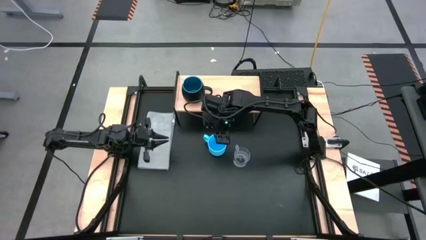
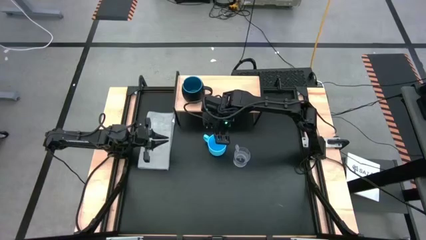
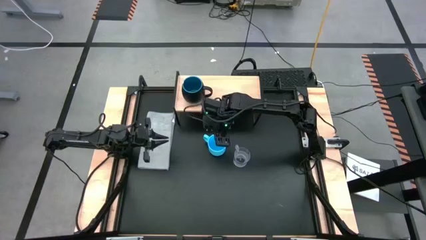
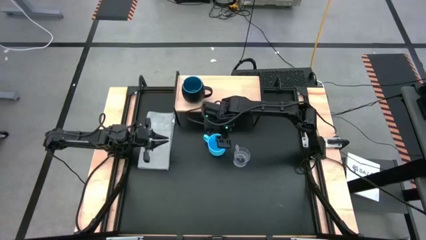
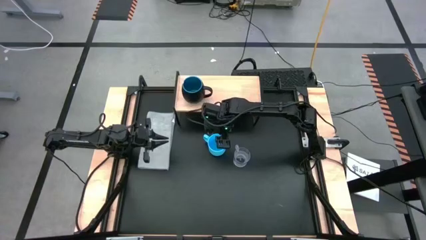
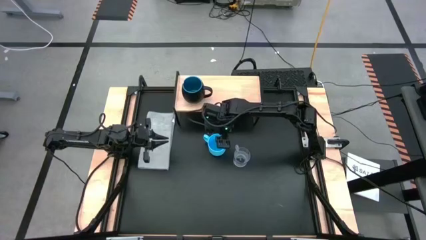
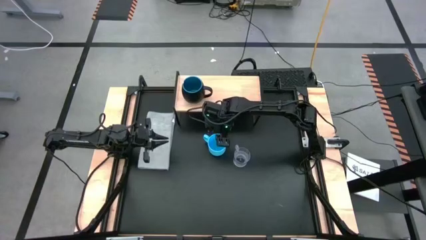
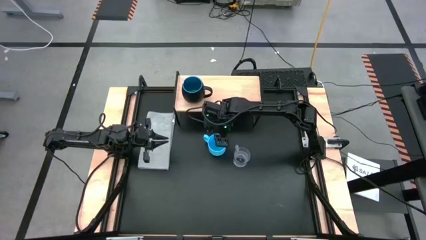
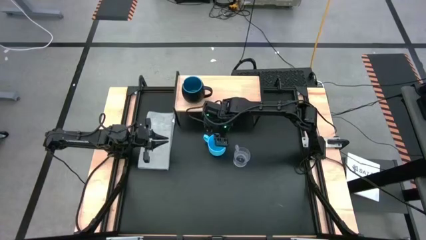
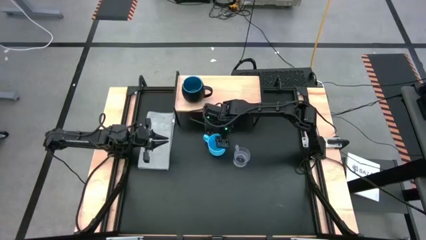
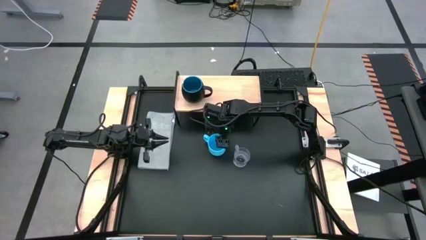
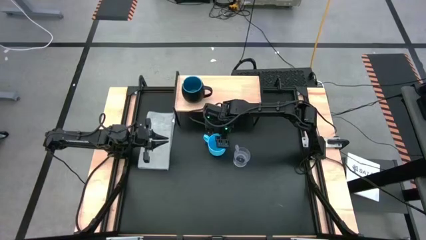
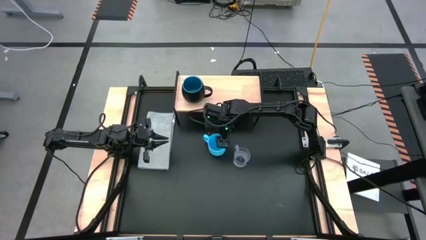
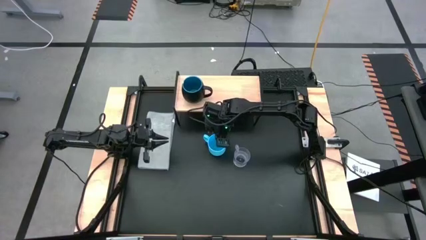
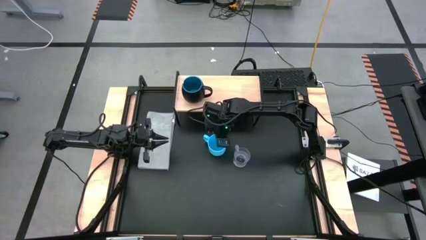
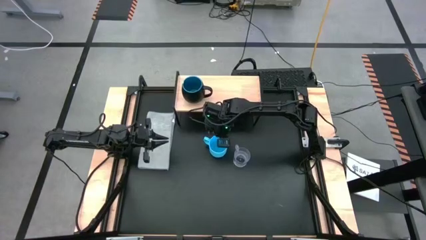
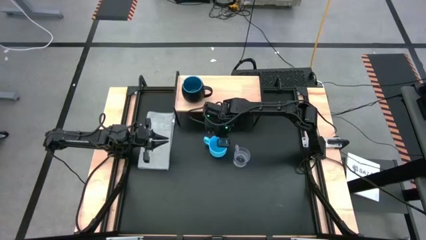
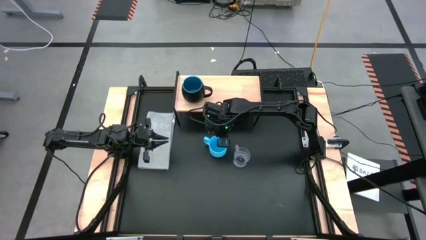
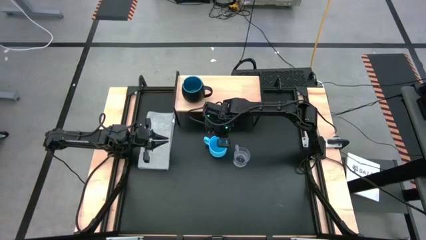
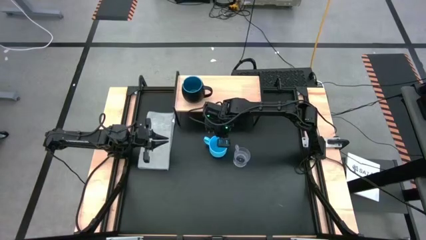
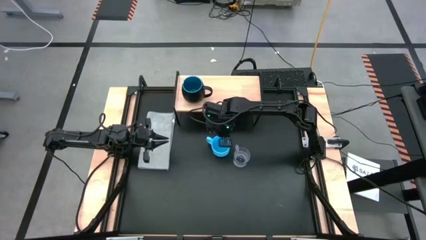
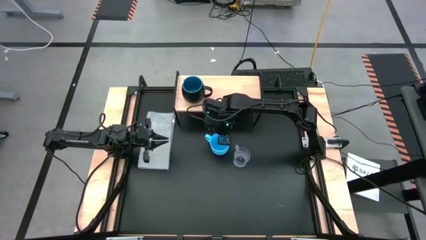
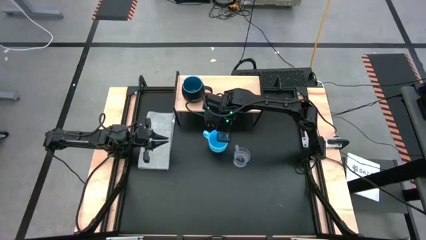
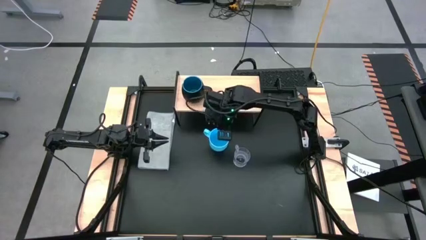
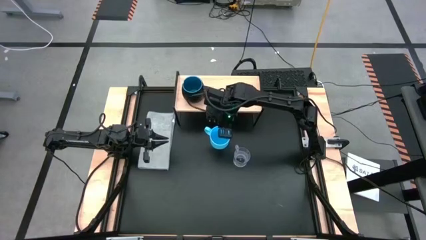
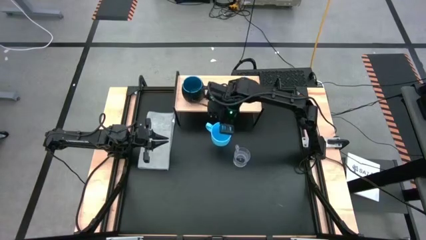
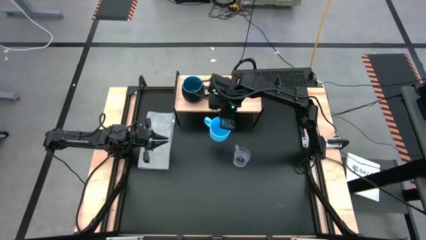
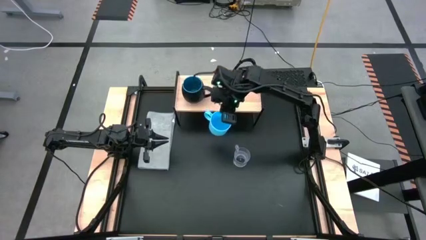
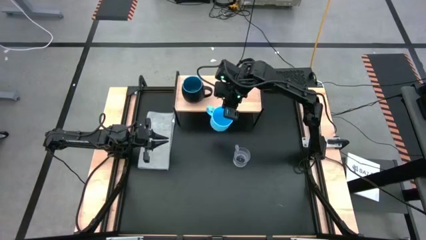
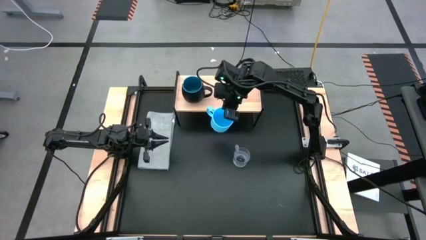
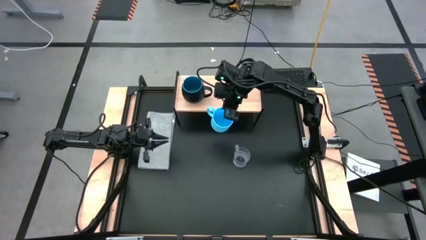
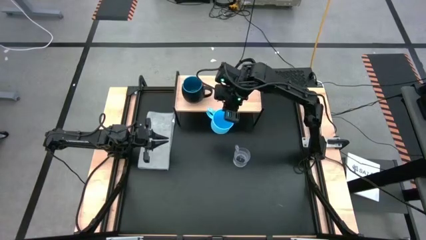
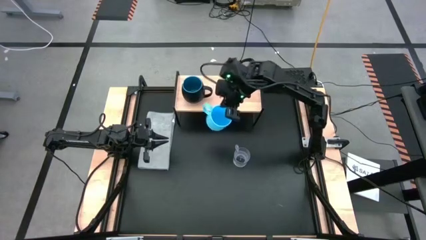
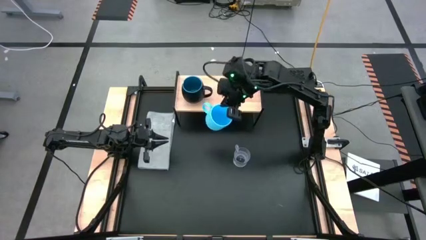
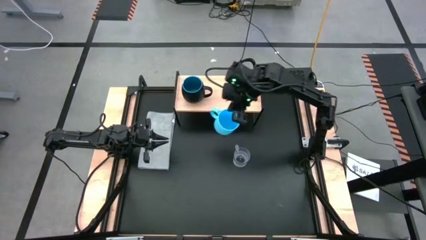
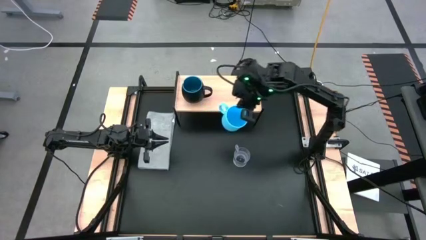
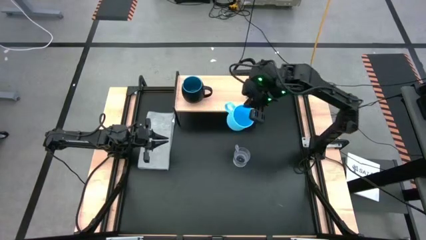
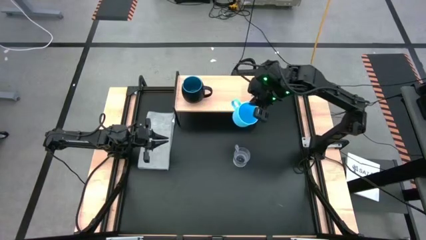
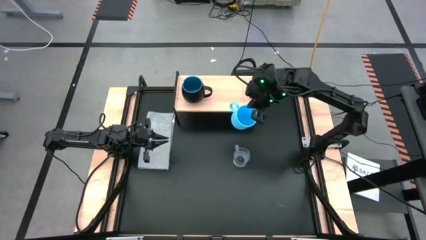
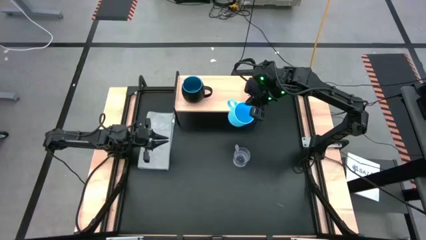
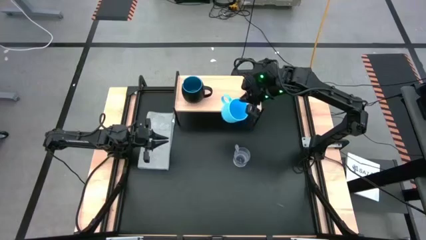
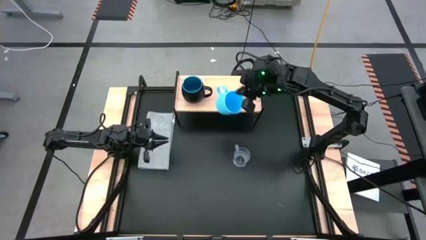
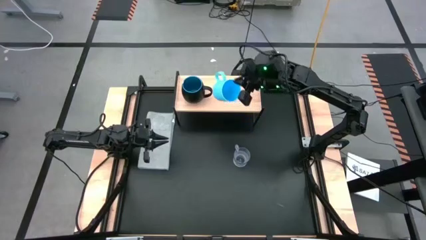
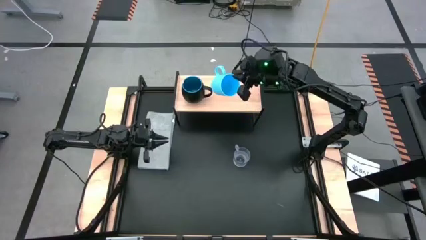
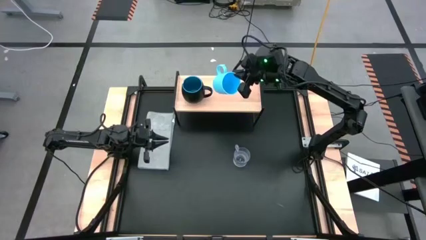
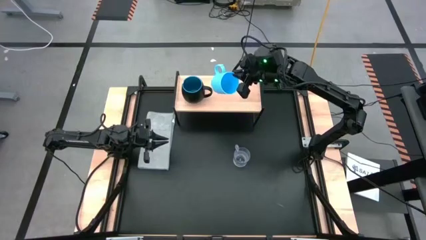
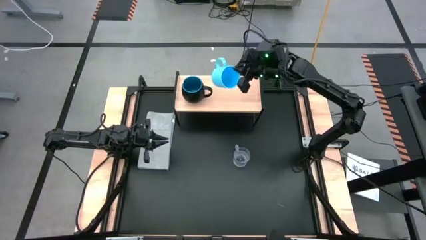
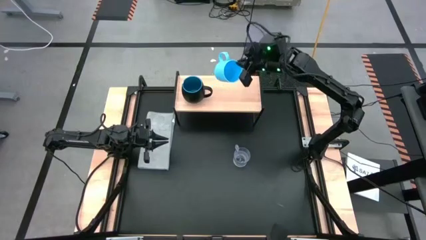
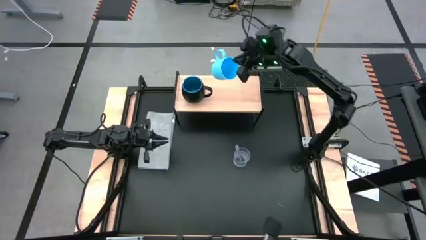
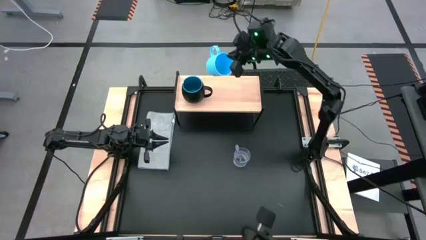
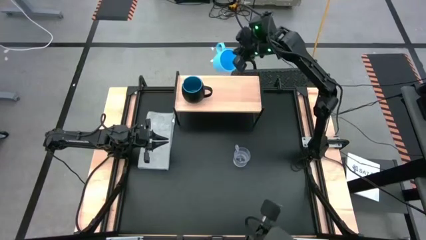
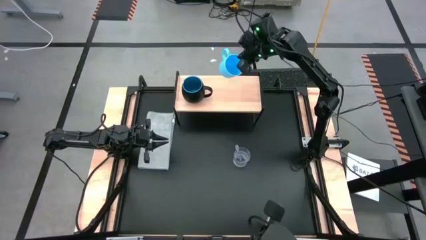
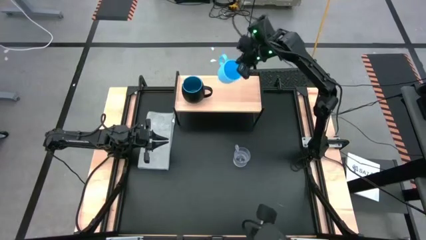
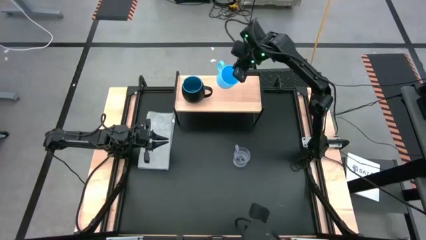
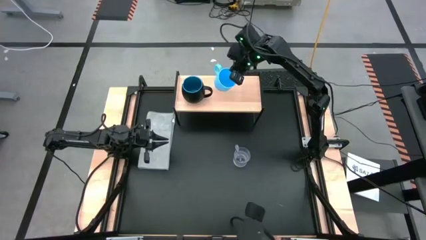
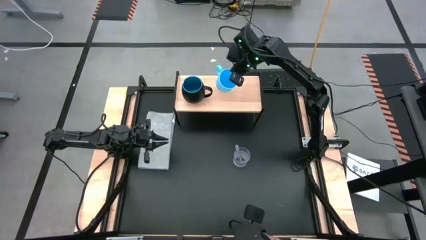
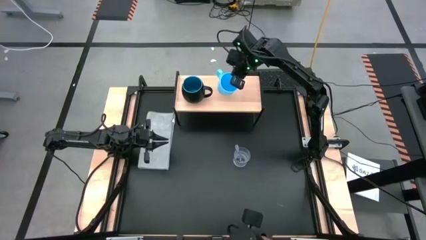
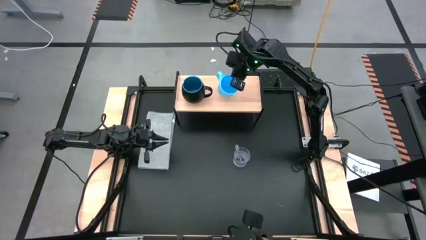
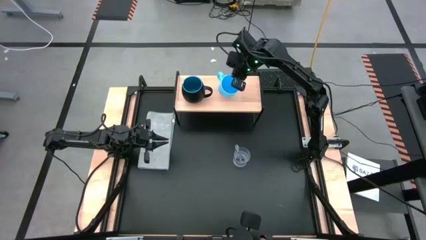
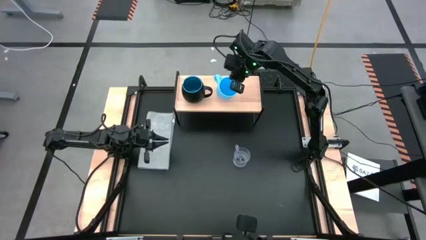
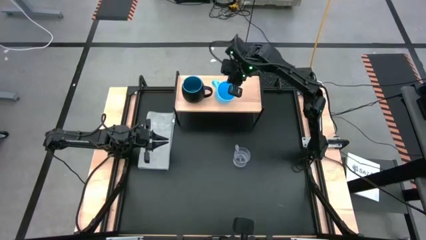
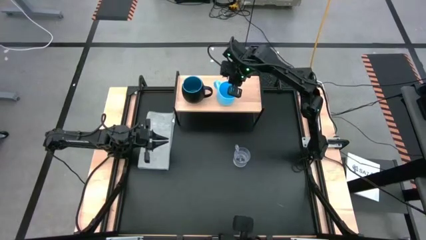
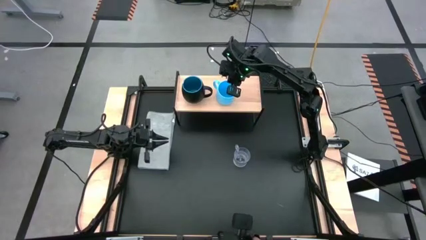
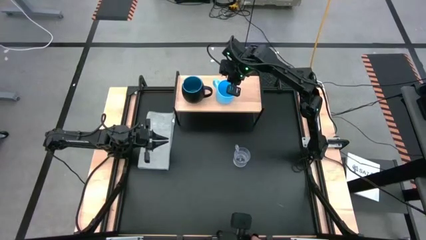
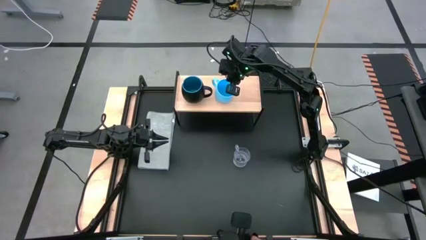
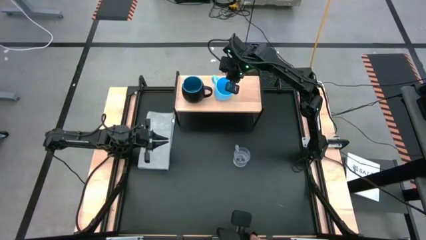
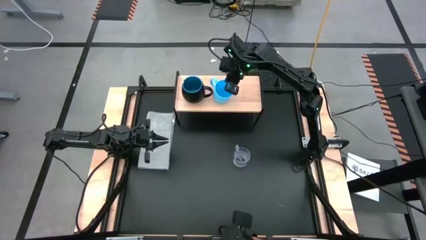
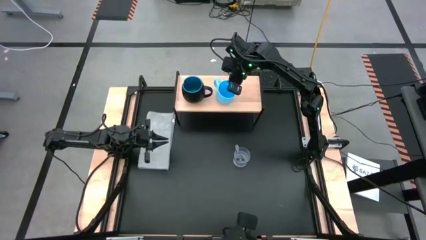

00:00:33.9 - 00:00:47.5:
Task: Stack small to large cups/mugs on shelf
Put the blue cup on the shelf

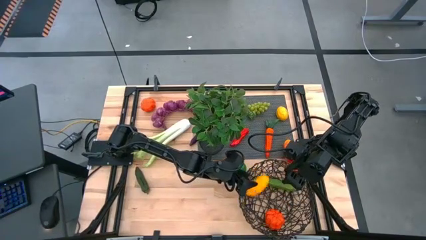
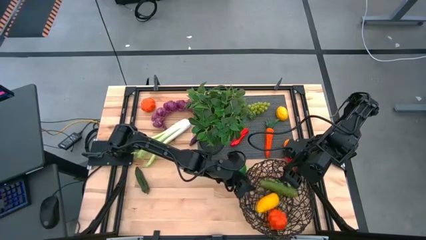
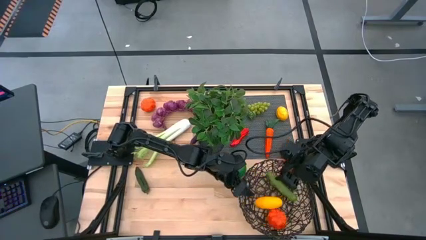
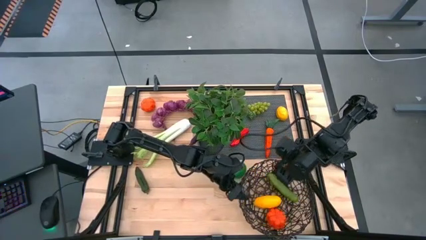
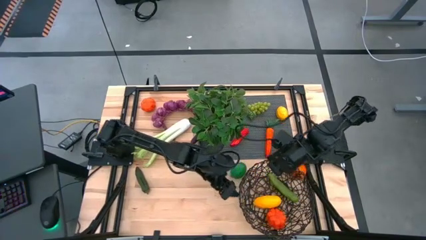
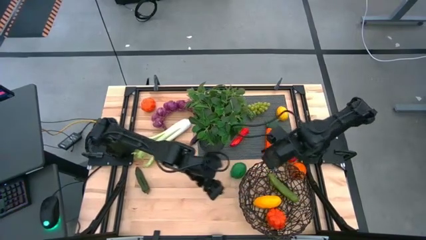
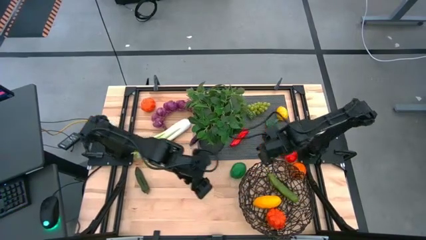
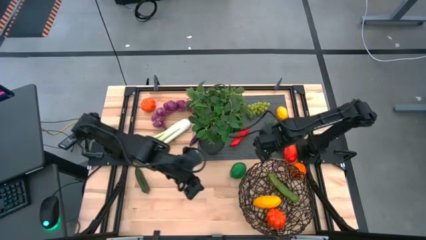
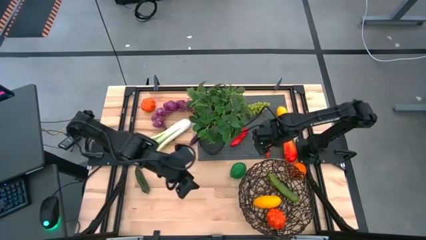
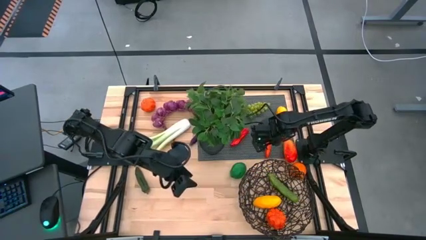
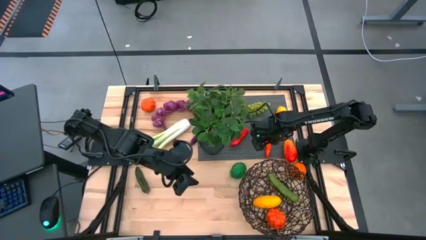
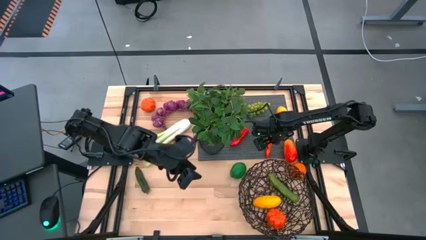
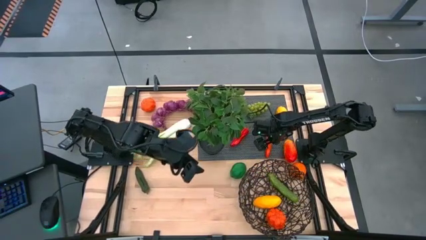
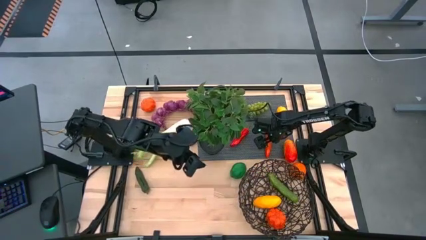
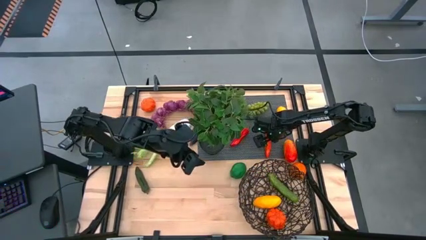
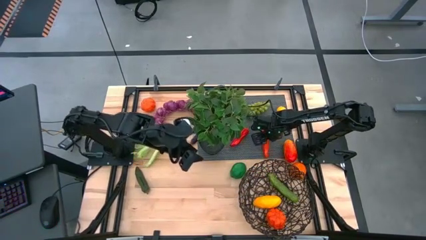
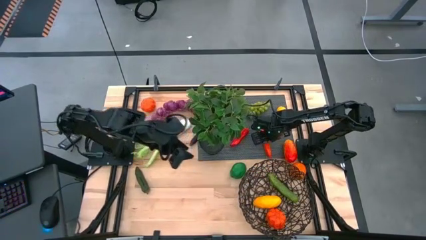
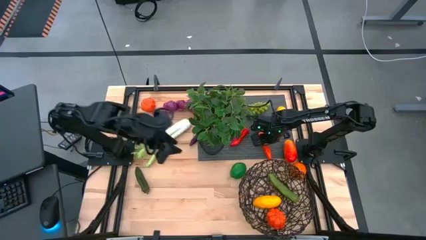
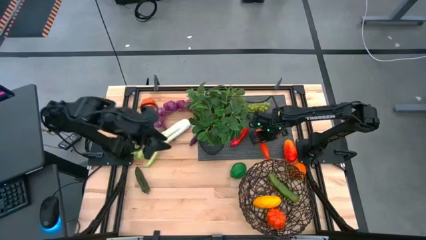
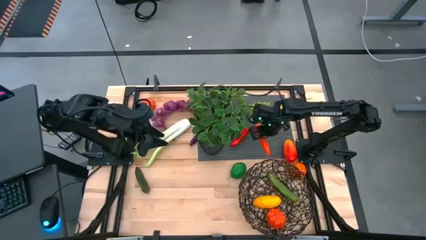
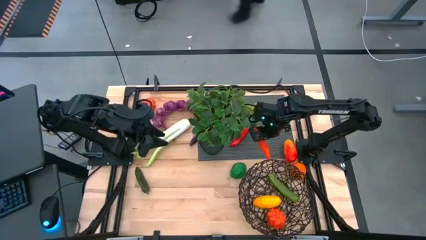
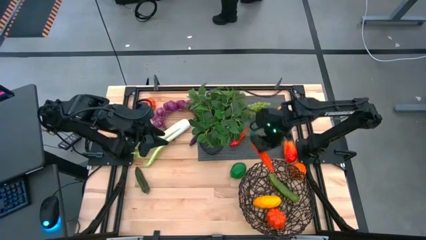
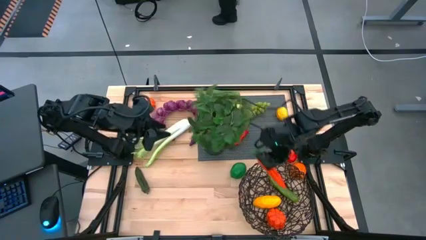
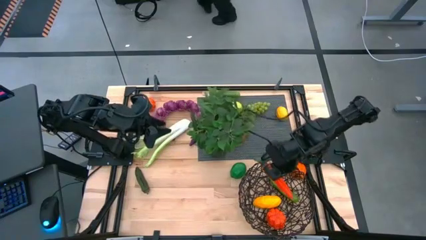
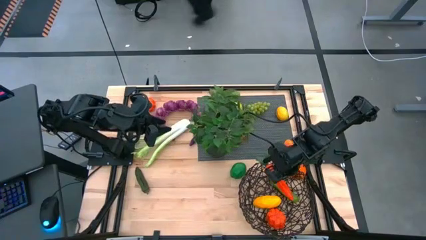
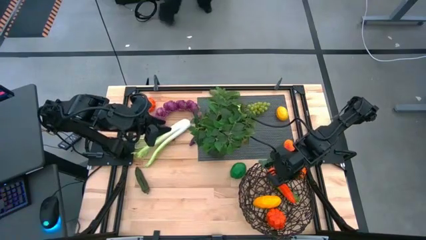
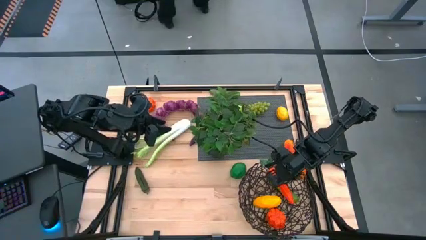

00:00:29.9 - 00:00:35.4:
Task: Build produce basket
Put the orange carrot into the brown wire basket
